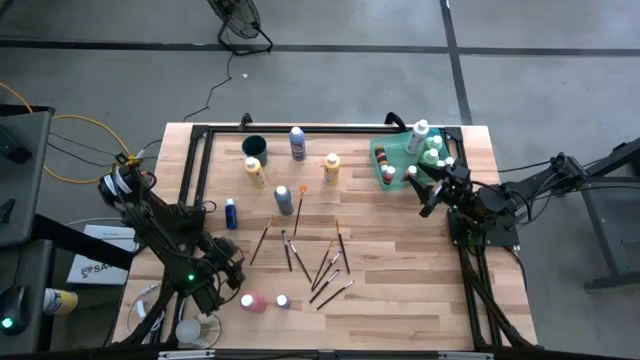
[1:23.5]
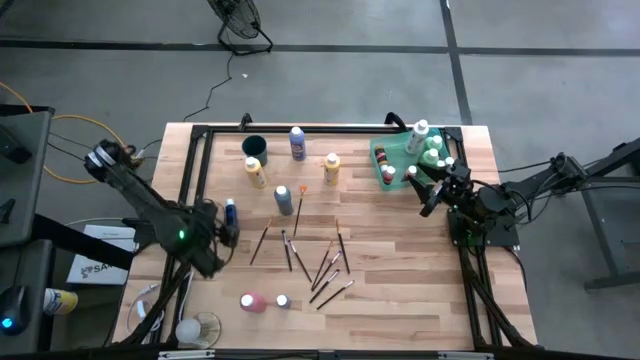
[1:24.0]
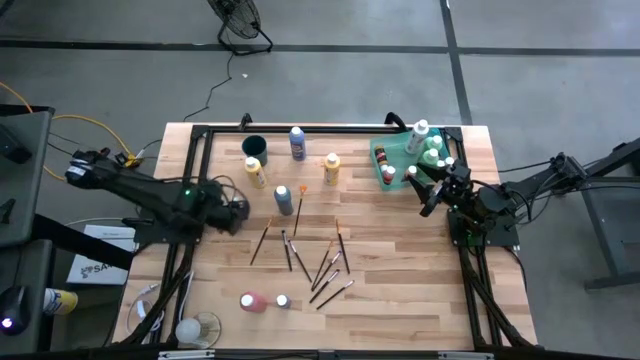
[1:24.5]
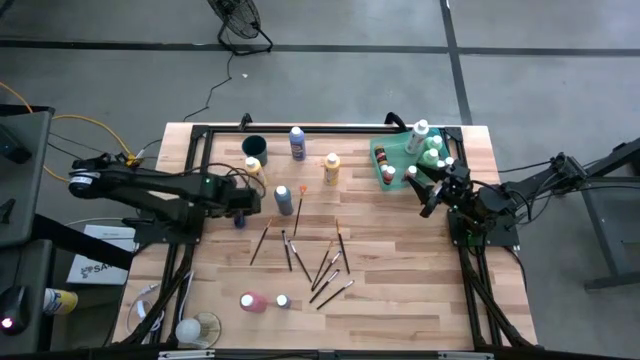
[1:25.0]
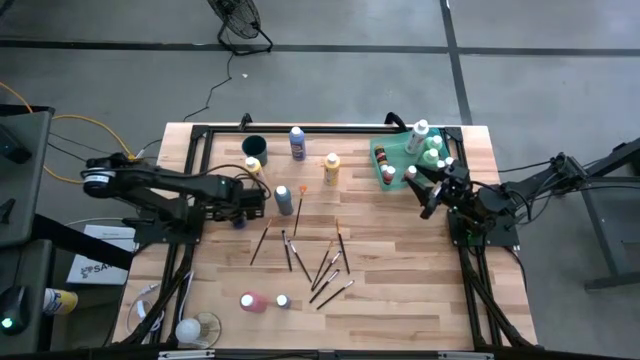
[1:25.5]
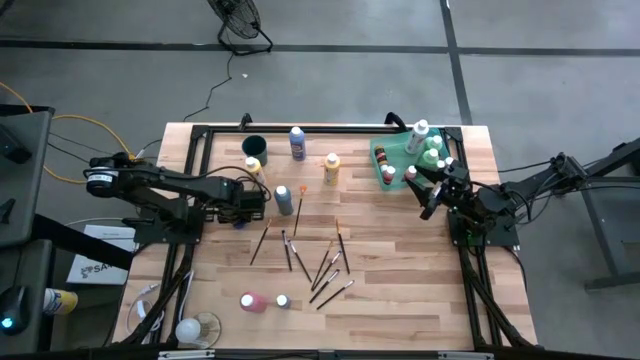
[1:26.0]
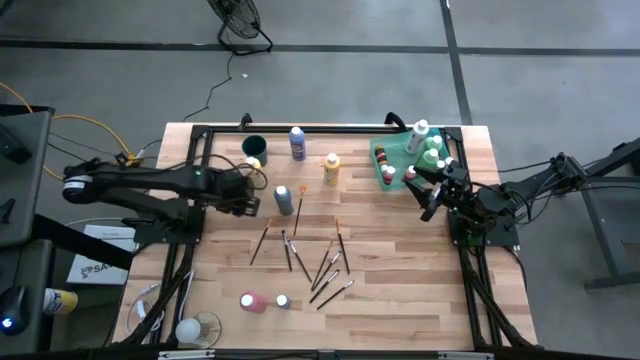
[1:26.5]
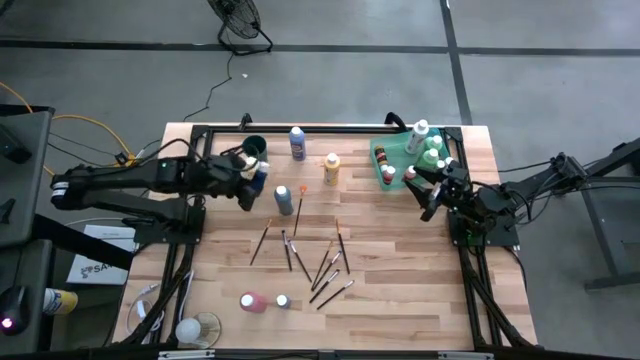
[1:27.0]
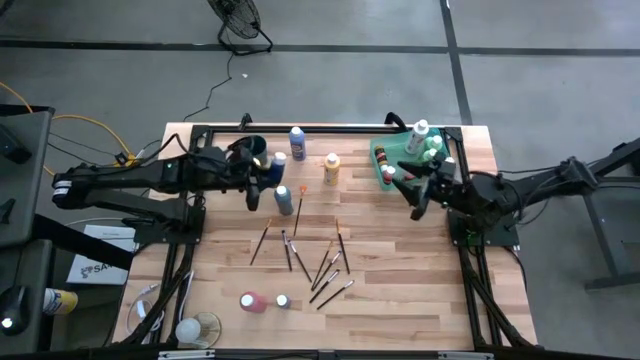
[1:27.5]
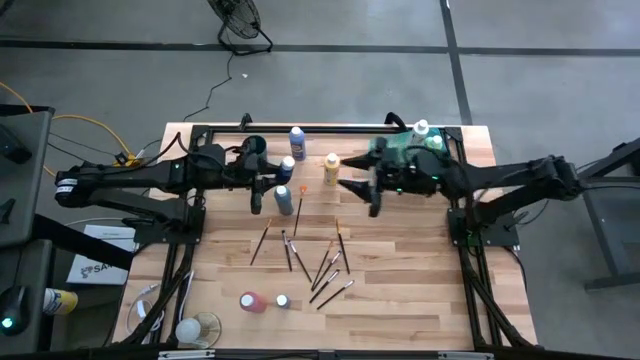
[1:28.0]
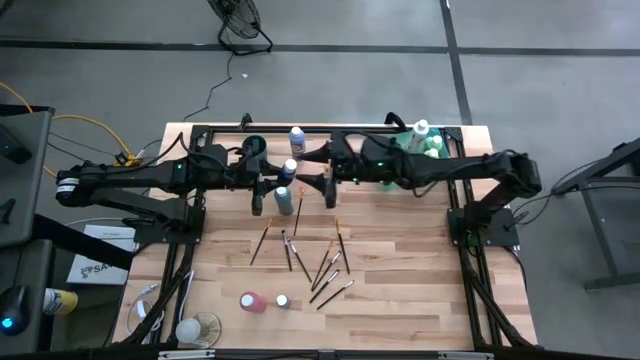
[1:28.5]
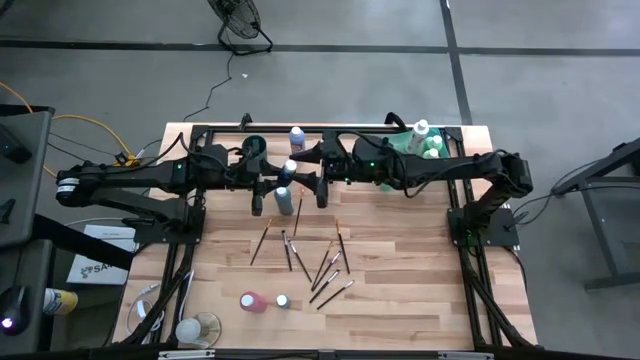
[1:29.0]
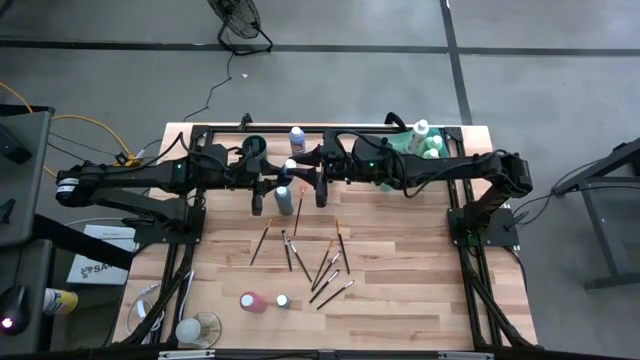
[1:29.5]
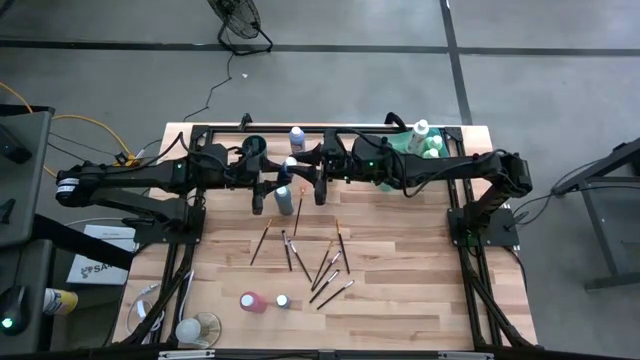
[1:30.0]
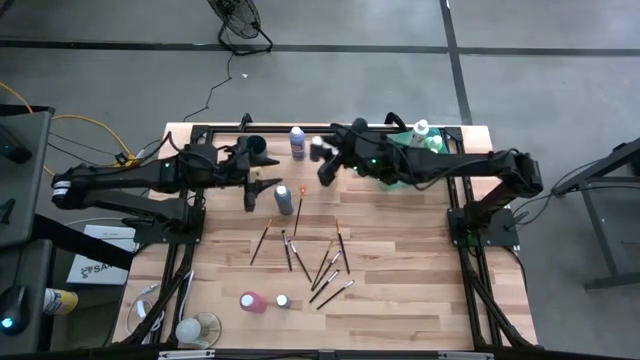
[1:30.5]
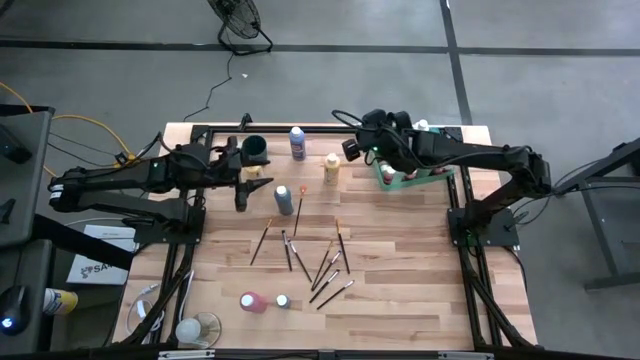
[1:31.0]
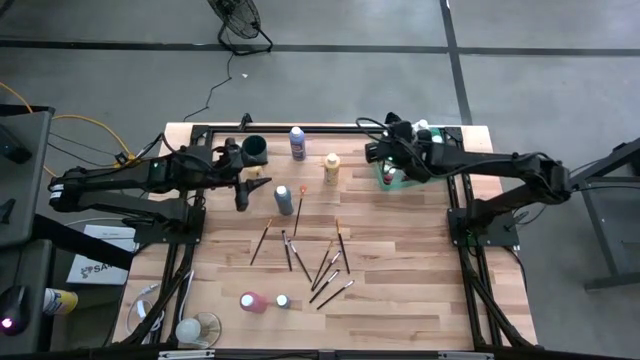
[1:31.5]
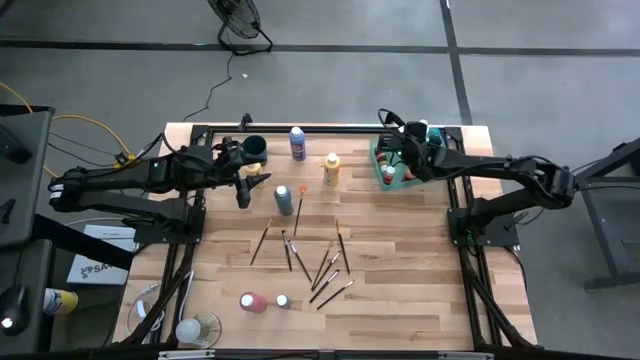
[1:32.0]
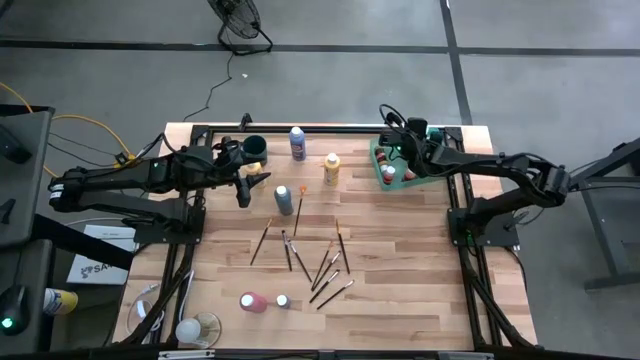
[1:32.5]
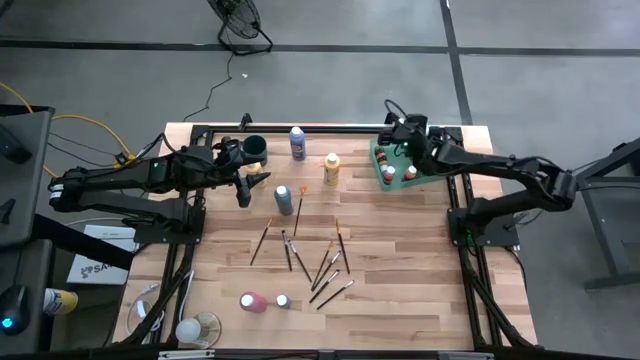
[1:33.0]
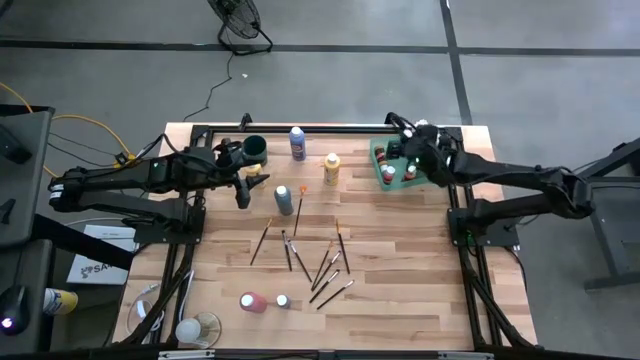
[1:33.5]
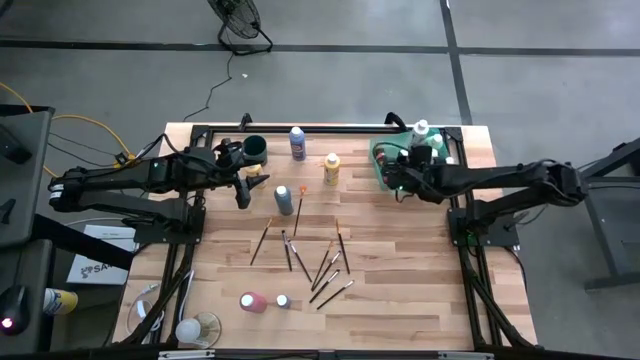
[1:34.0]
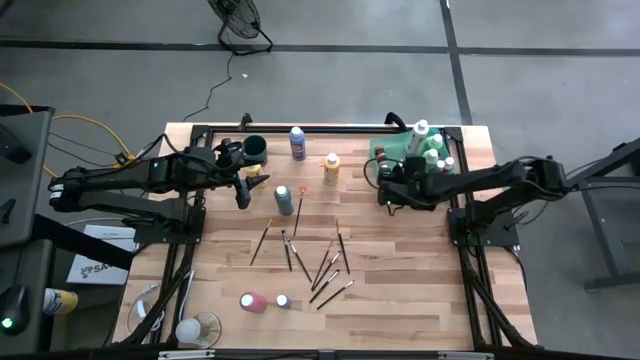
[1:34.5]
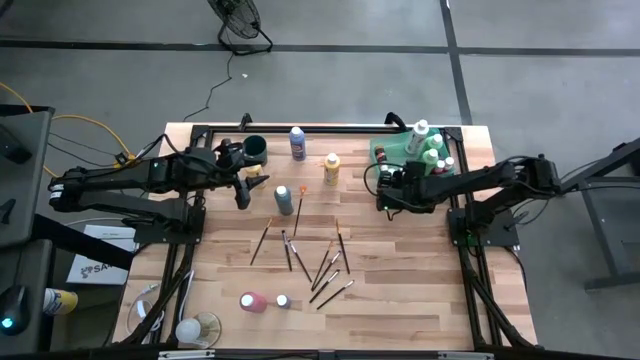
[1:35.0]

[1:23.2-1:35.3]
Task: Pick & Place Paint Supplies
Put the small blue paint bottle into the green bin

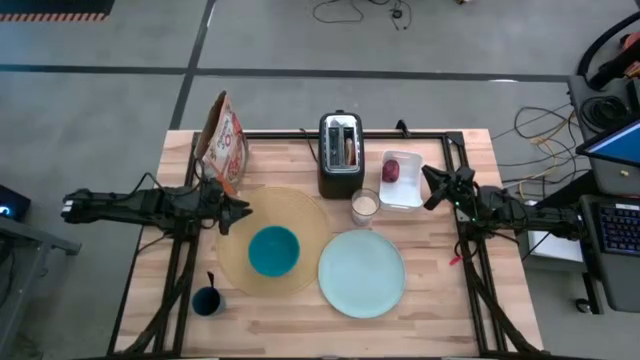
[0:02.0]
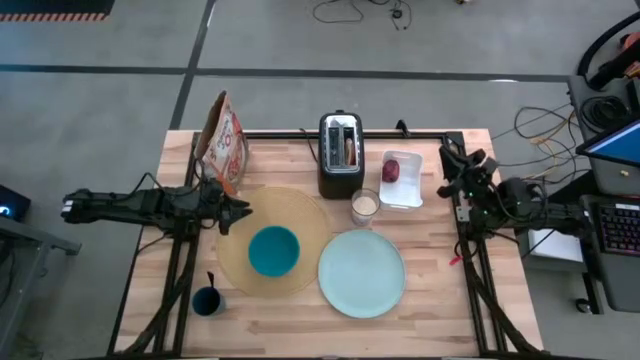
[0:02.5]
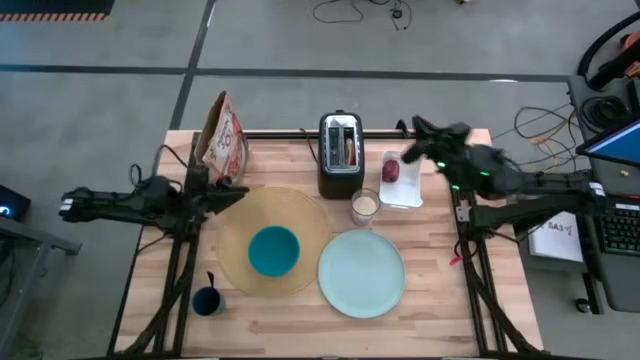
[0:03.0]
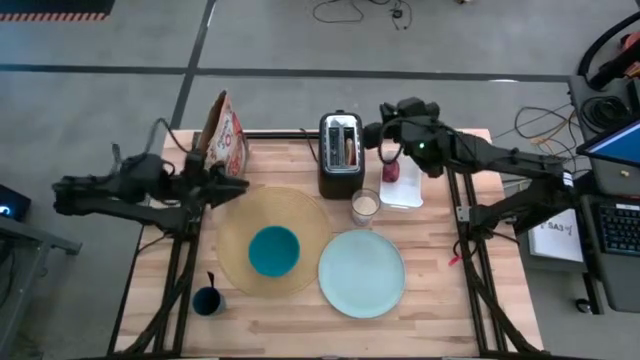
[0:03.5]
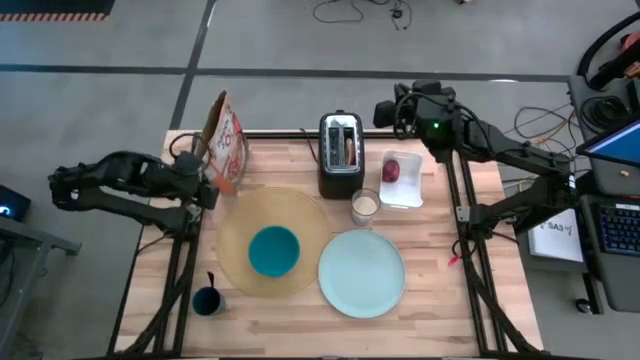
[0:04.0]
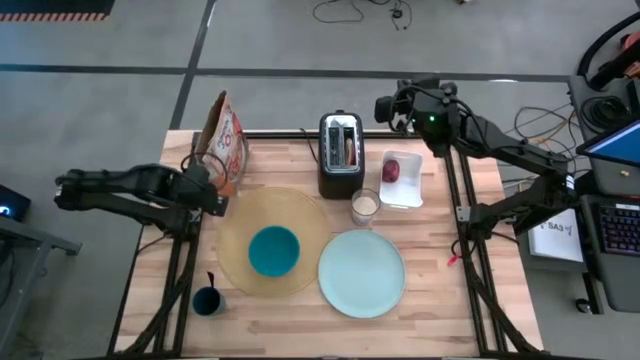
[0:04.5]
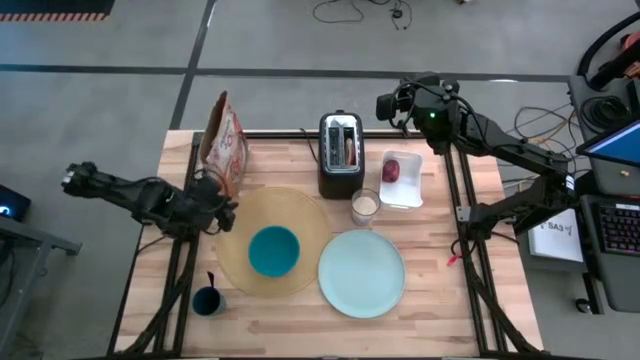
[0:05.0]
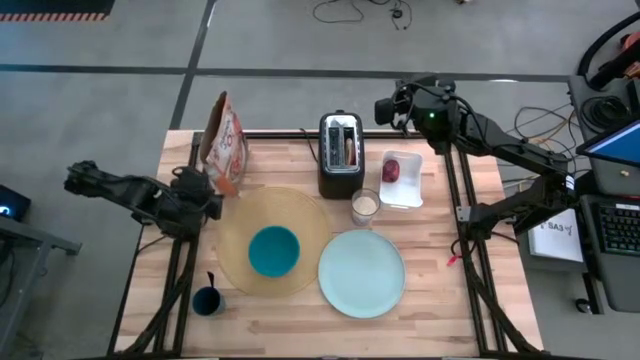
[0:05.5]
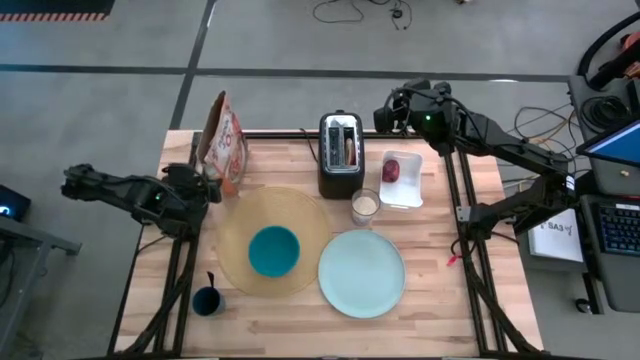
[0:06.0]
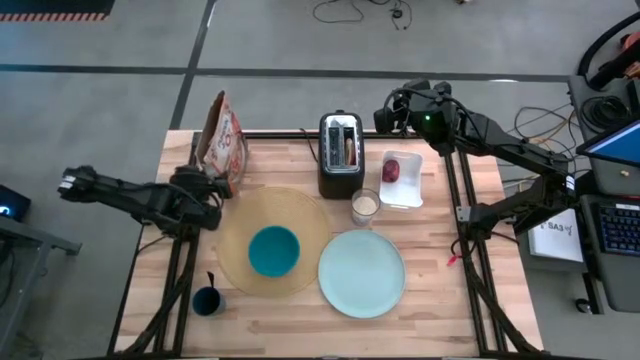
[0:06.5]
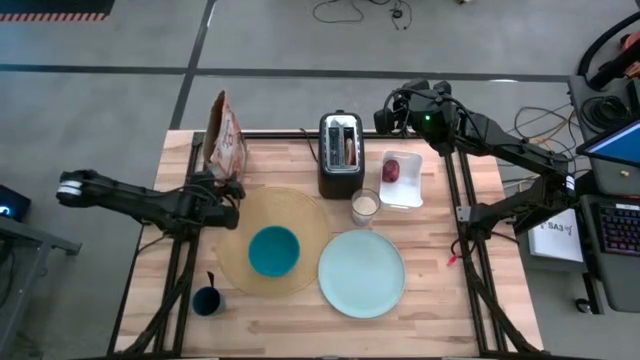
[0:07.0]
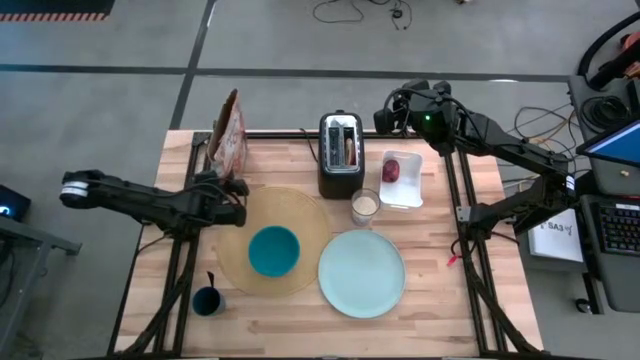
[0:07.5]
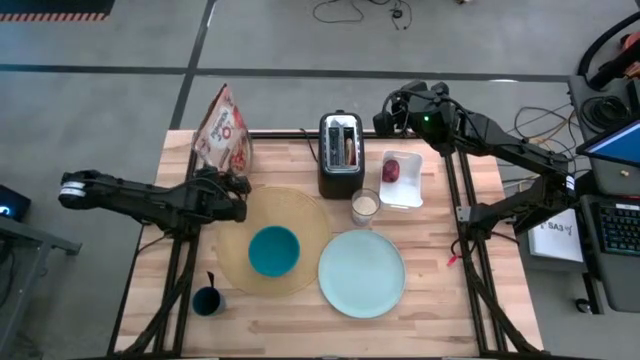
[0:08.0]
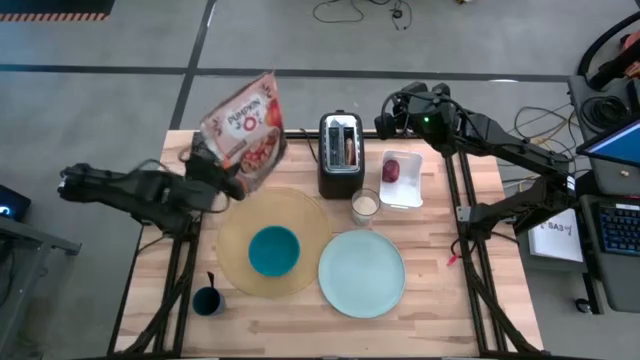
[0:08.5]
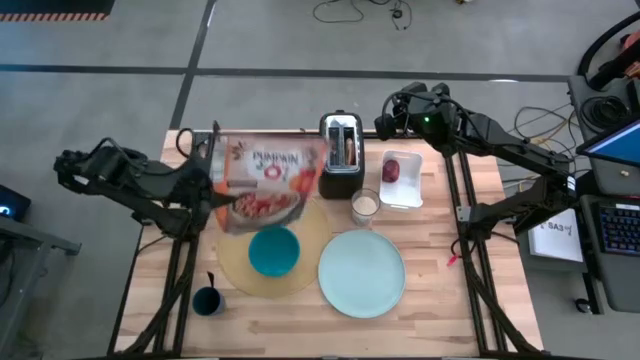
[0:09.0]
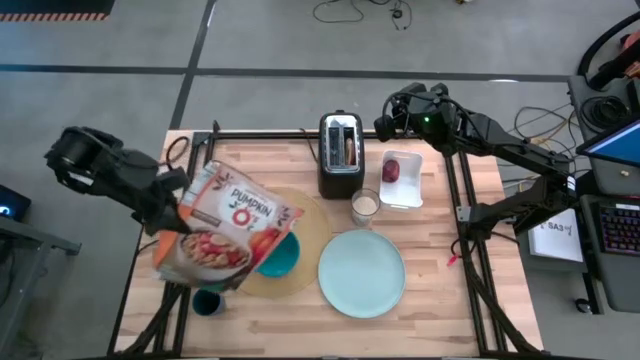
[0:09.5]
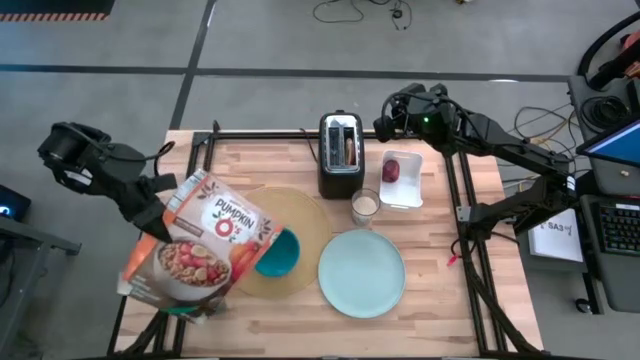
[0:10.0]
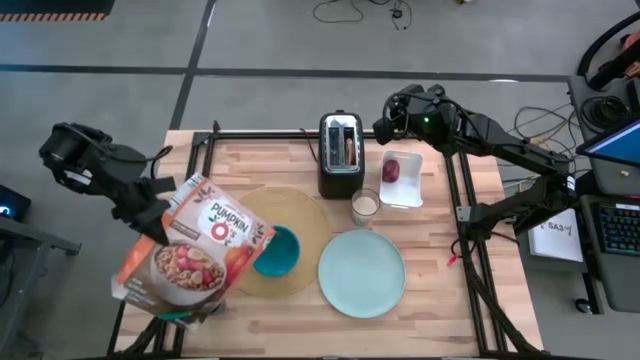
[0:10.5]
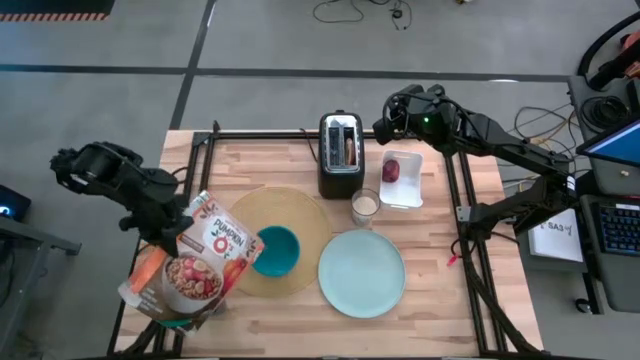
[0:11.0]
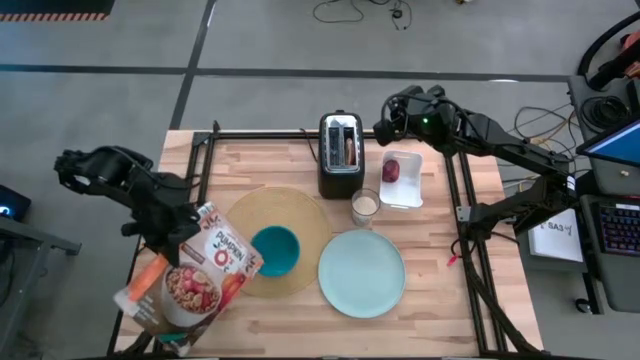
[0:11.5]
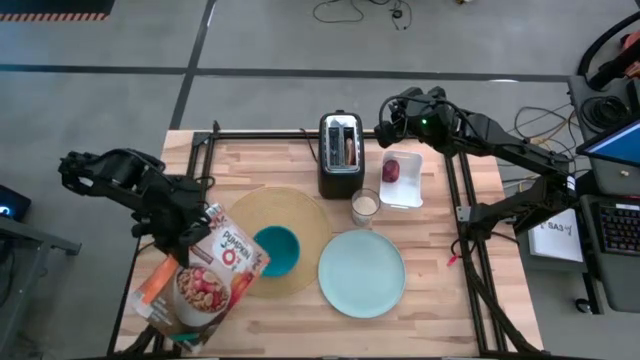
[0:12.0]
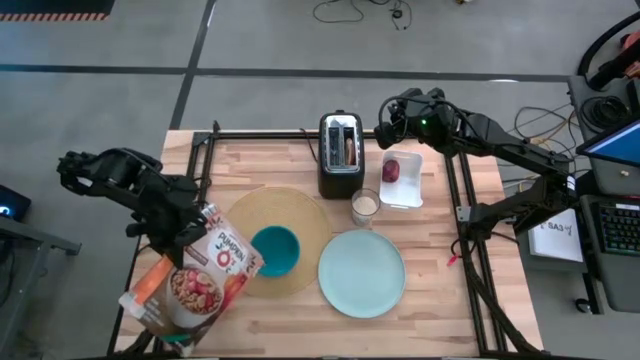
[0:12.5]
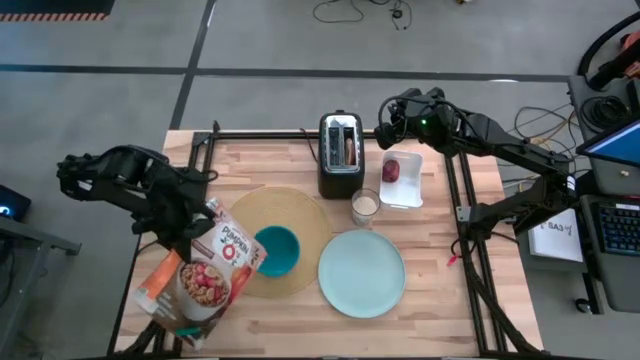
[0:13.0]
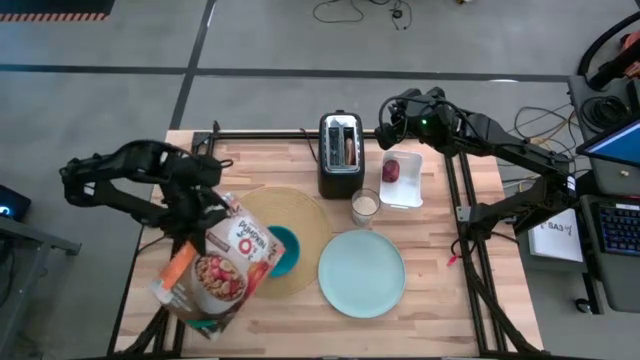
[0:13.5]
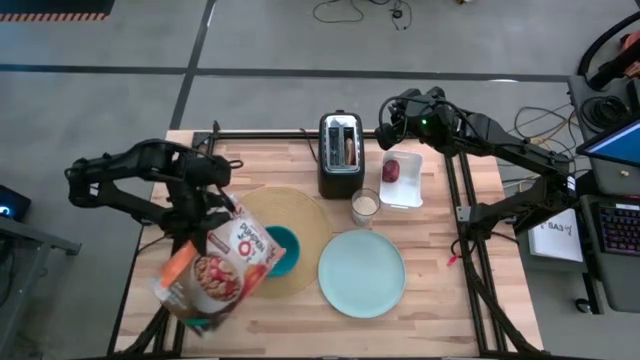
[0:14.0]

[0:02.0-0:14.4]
Task: Arrange a breakfast setting
Put the cereal from the cereal box into the blue bowl
